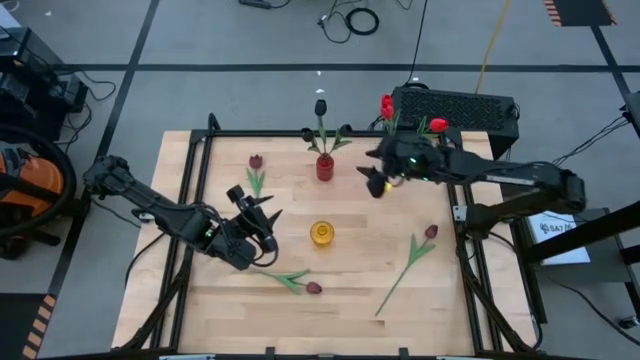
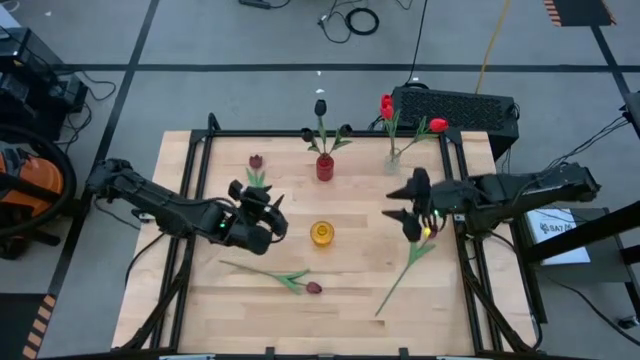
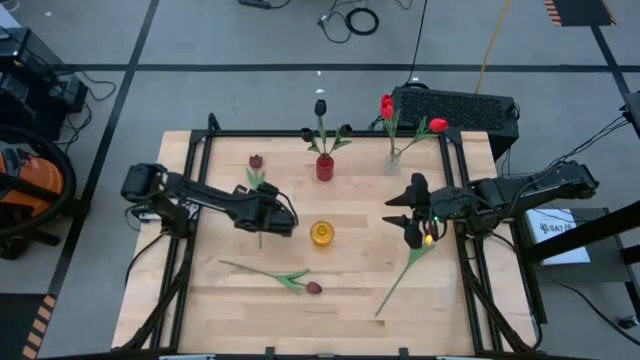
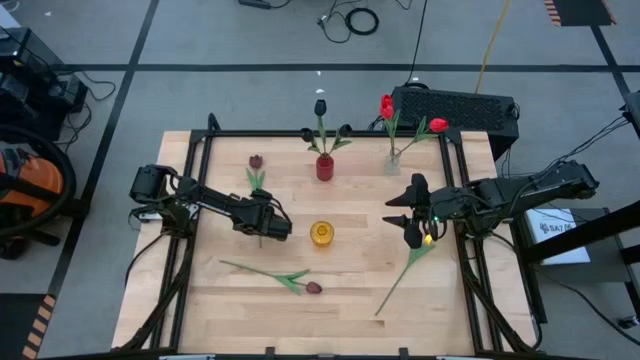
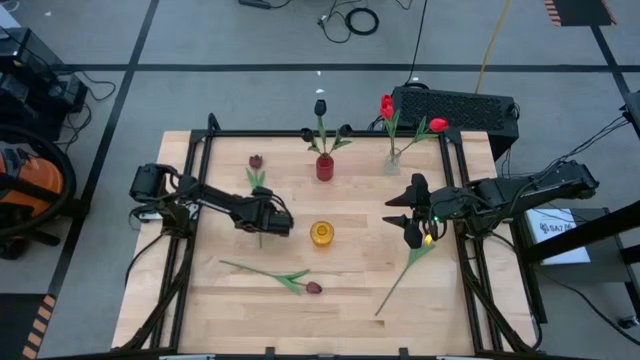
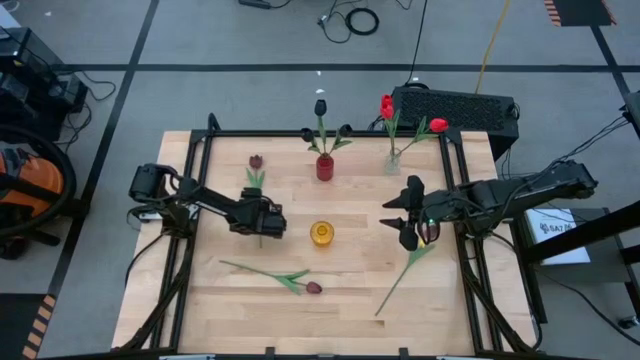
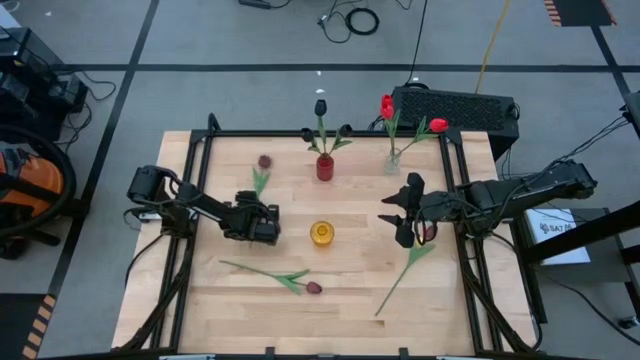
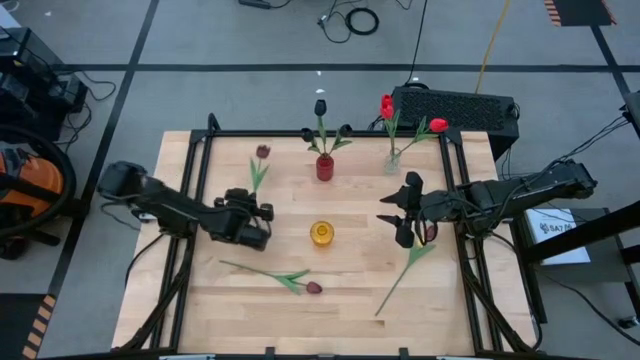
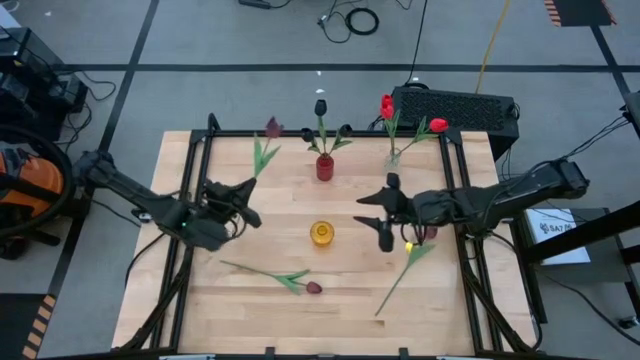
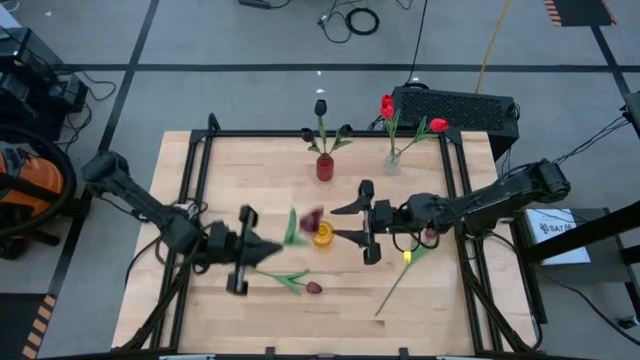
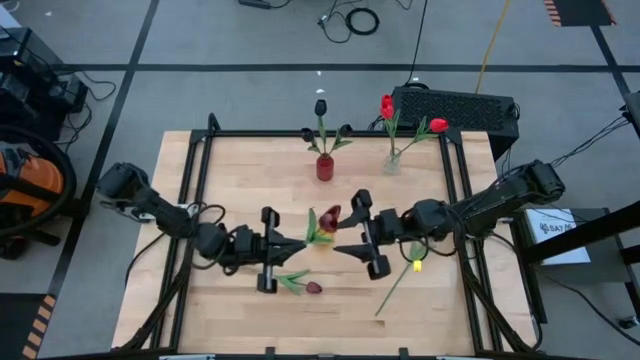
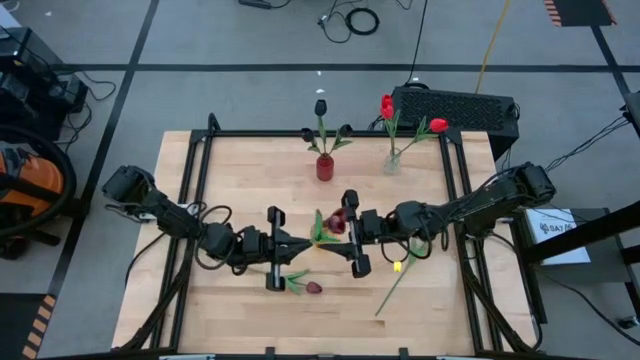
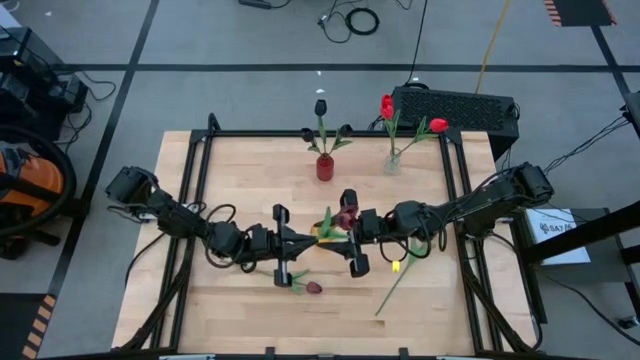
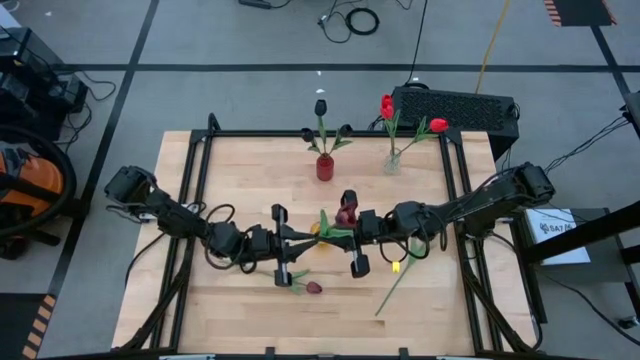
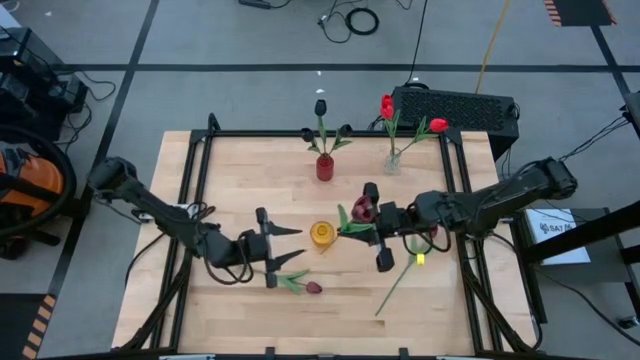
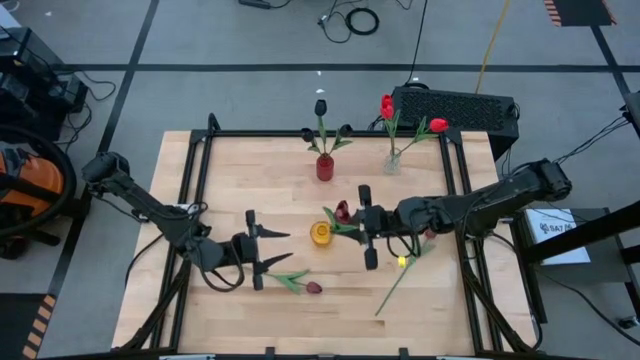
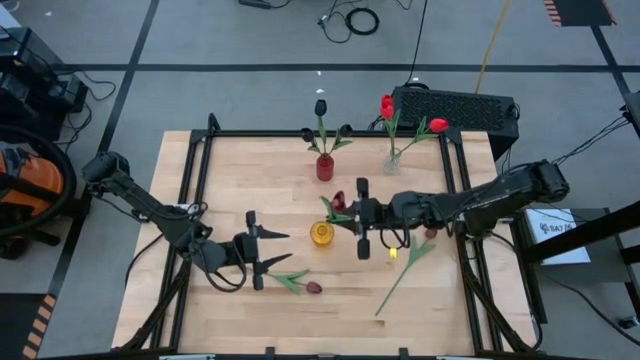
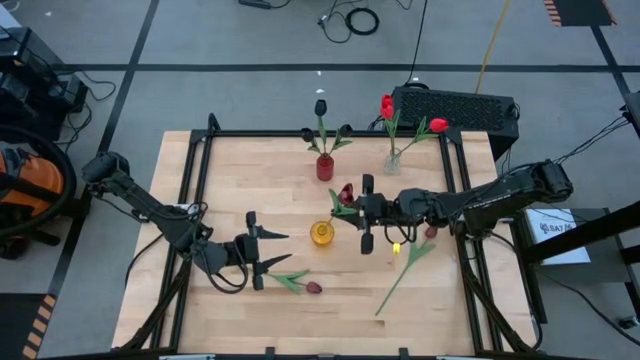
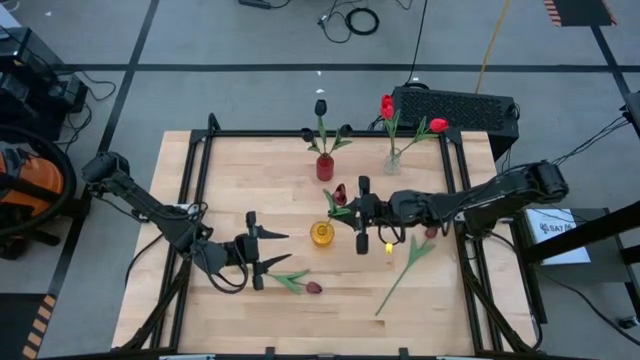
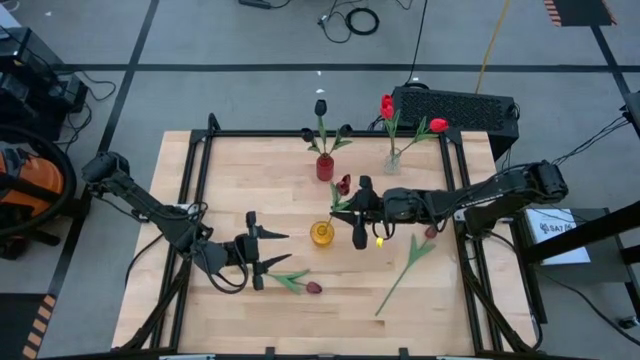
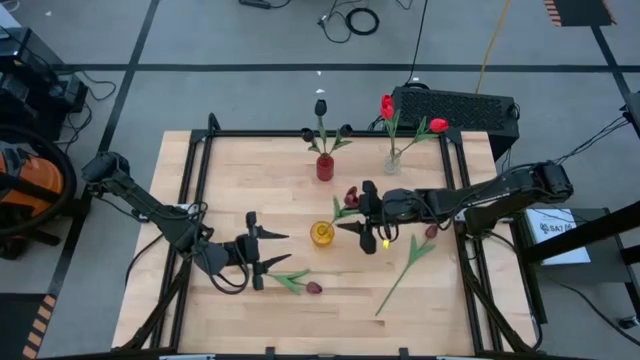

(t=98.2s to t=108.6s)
Task: Sort flowers into vase by color
Put the top dark red flower into the yellow vase

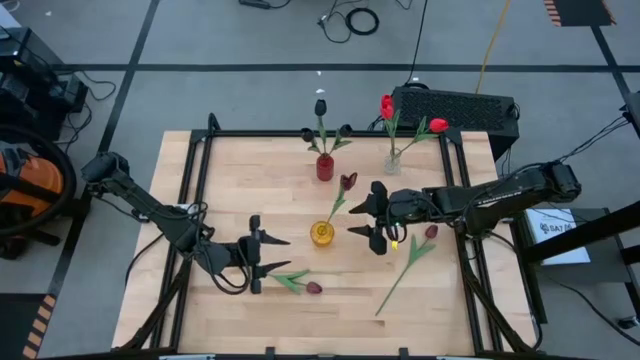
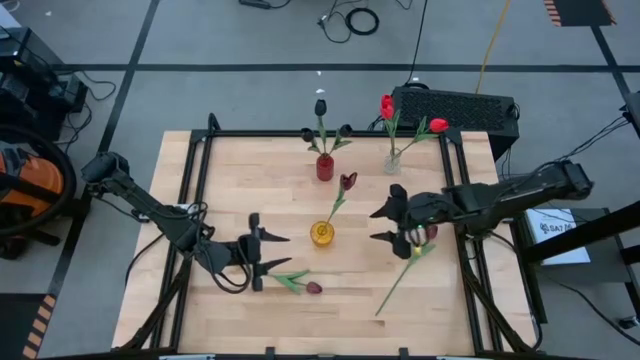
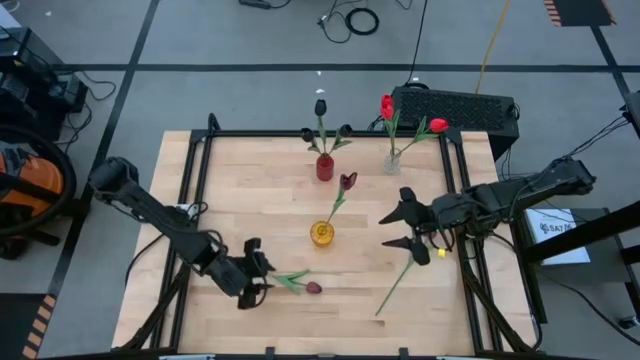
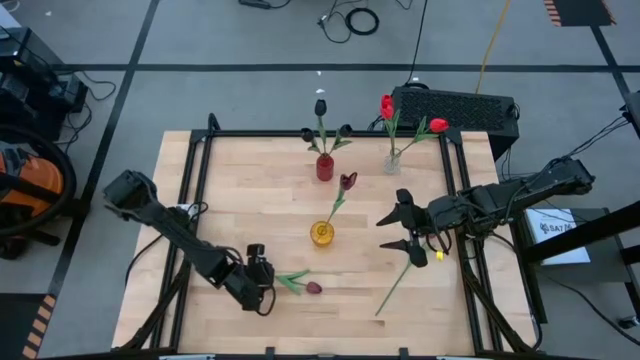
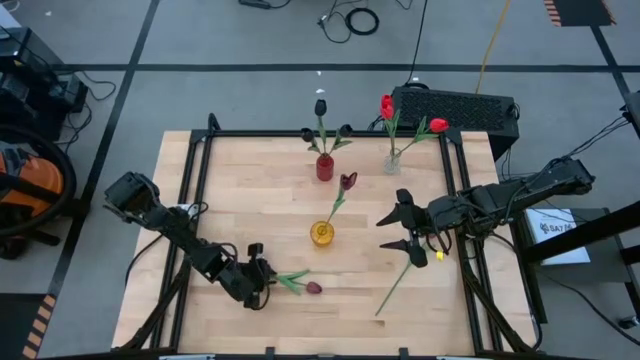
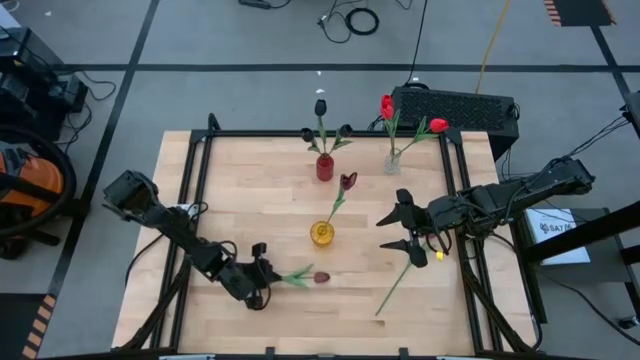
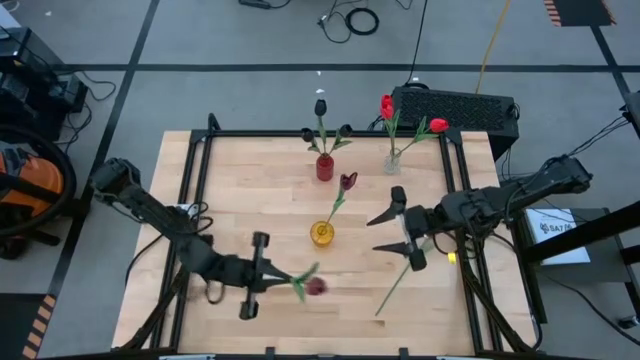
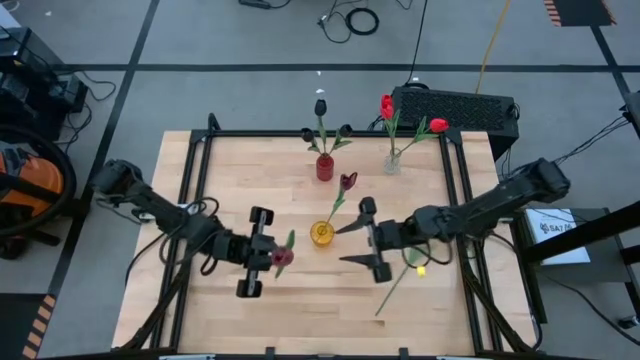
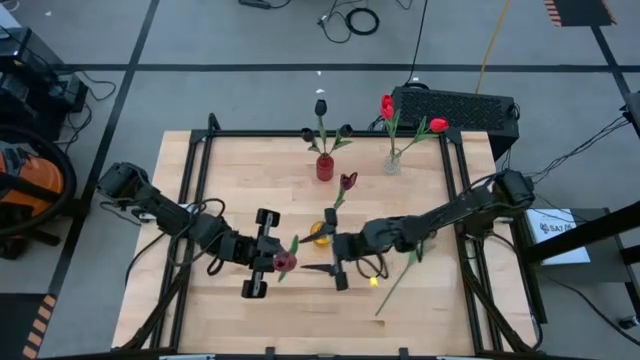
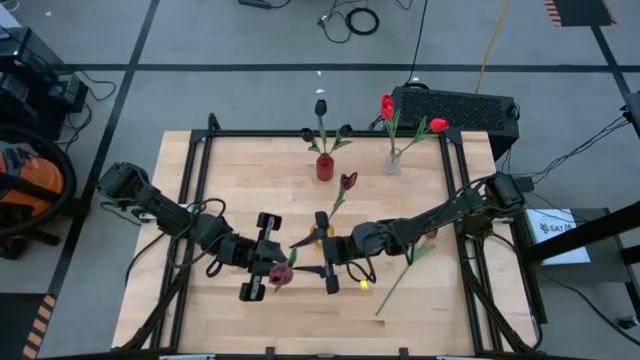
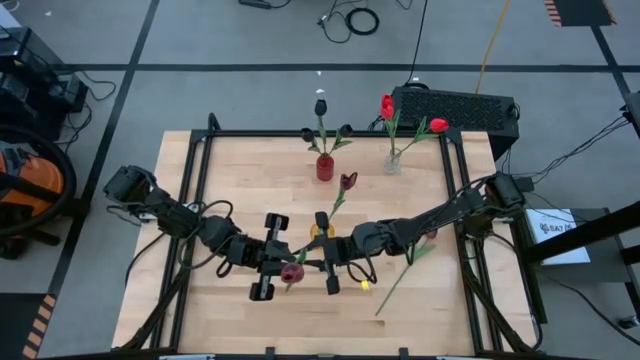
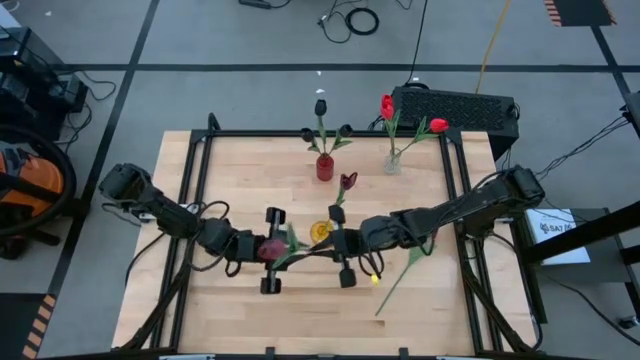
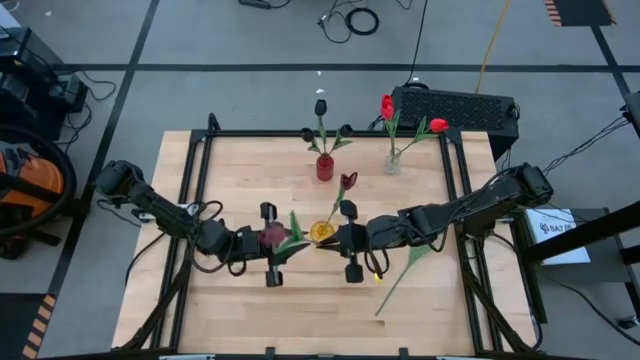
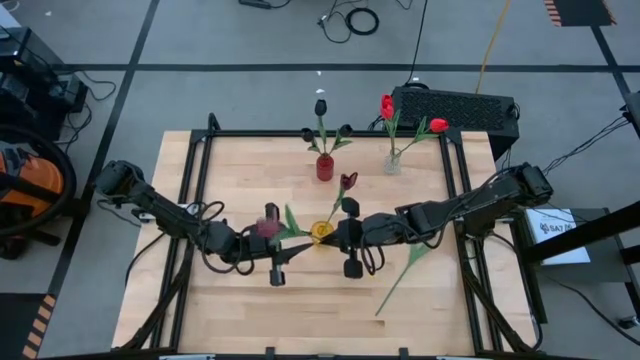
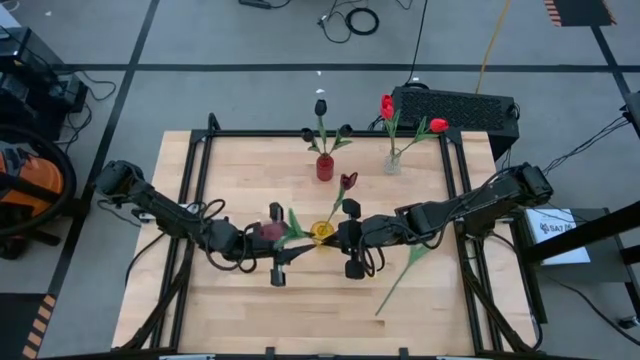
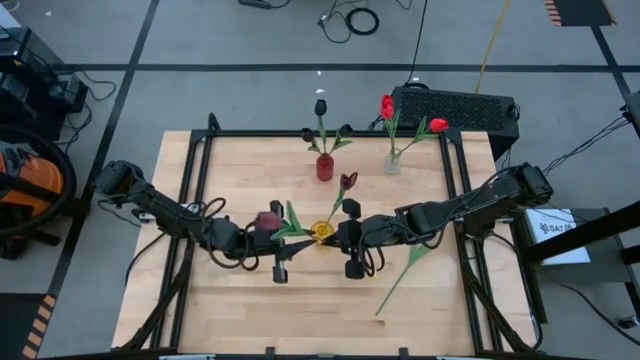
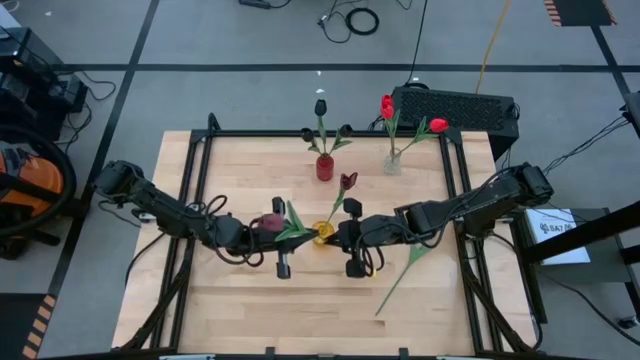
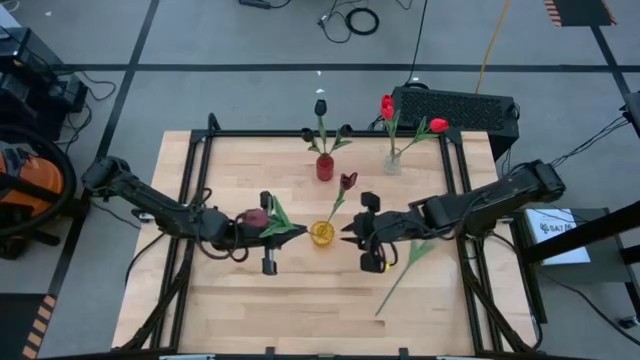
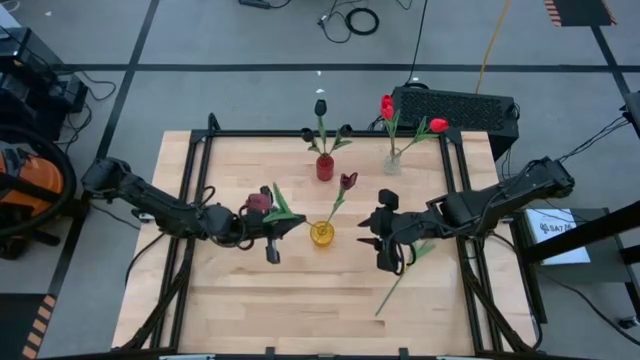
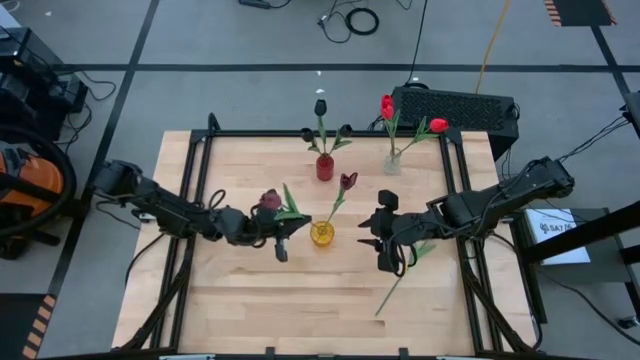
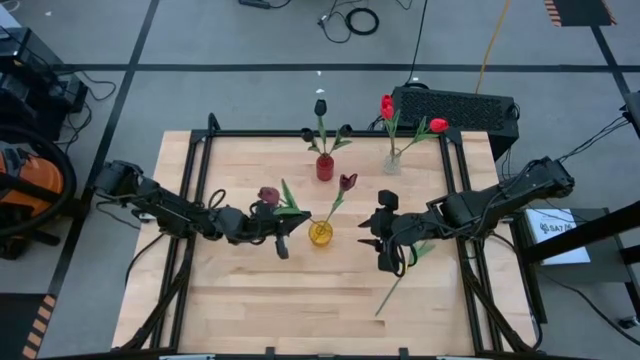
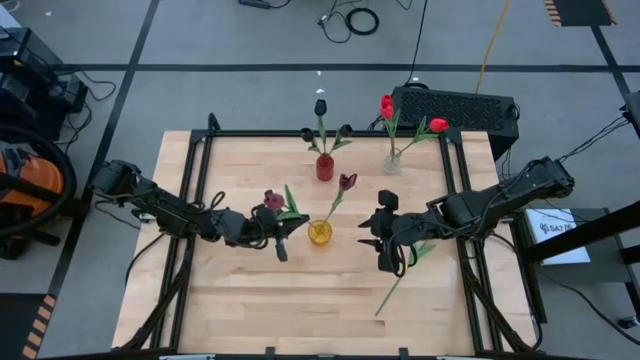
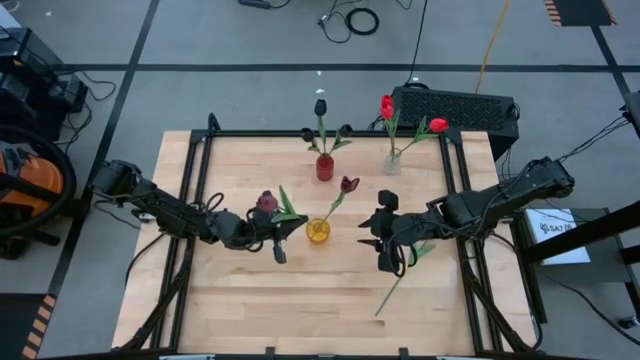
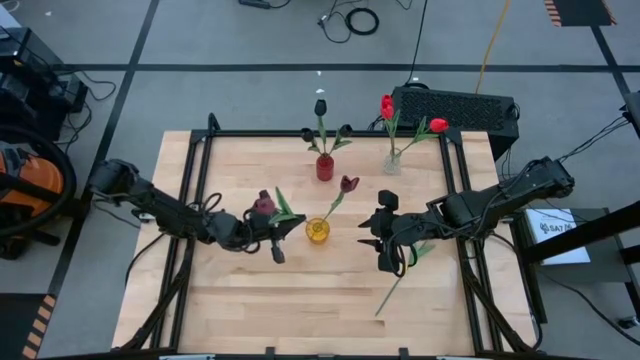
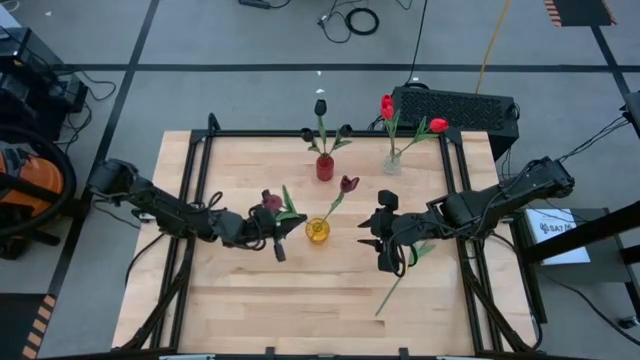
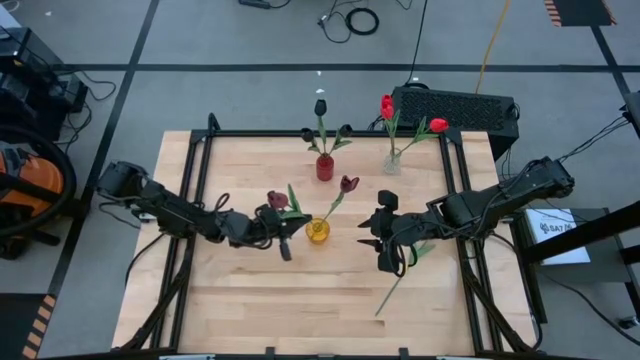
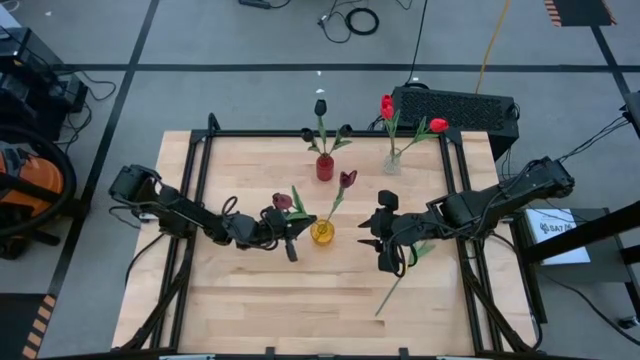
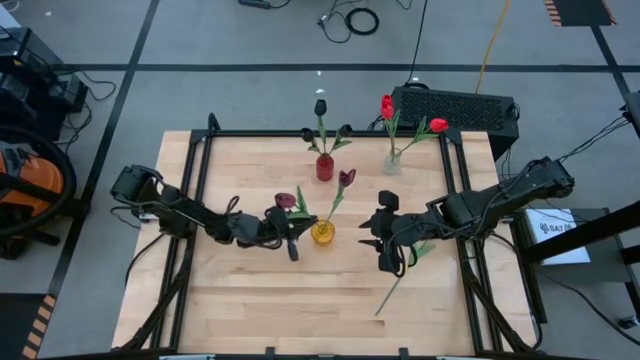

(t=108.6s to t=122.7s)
Put the left dark red flower into the yellow vase
